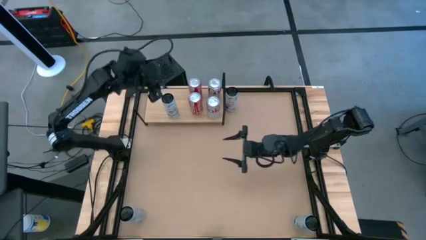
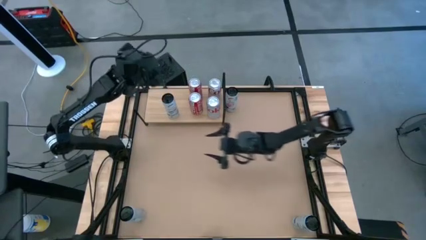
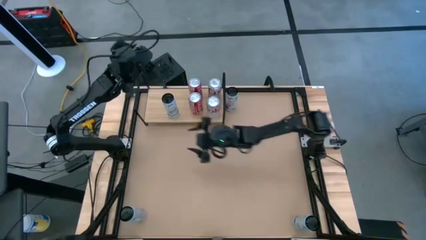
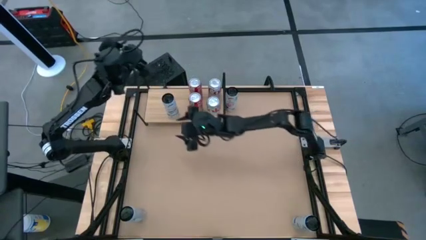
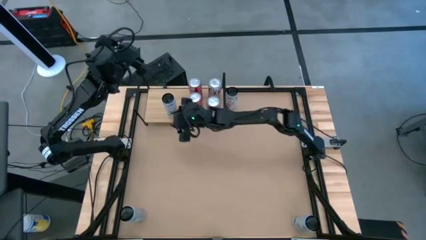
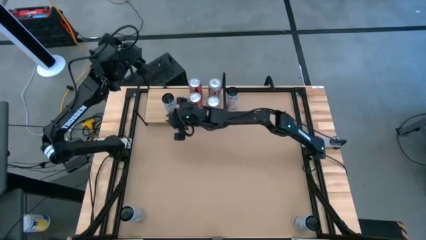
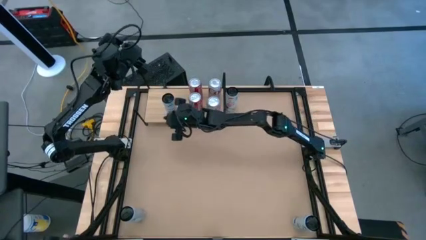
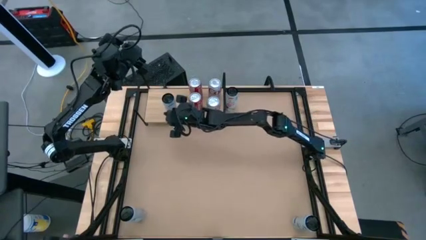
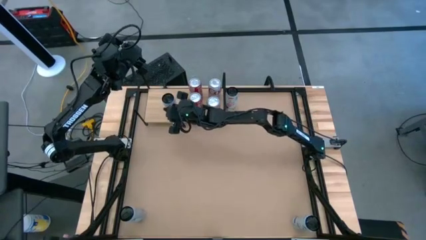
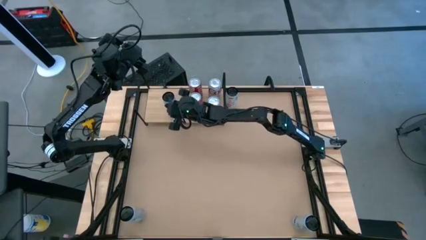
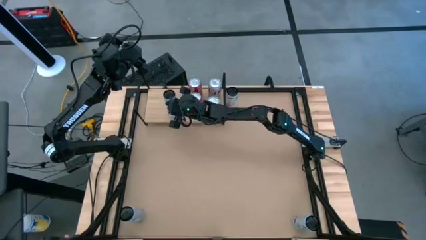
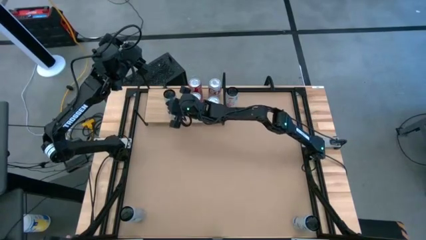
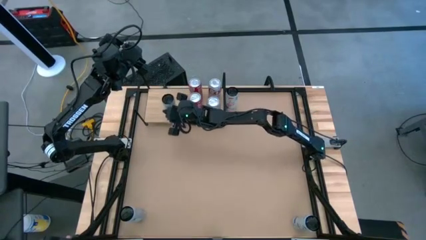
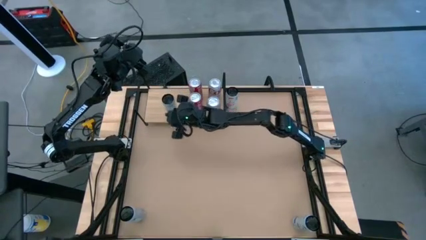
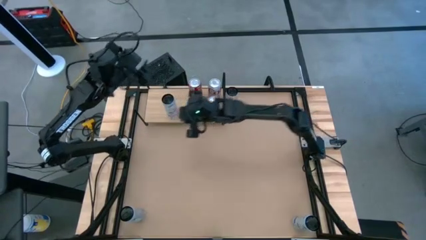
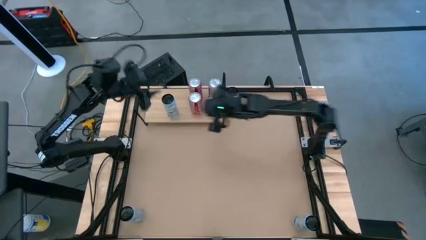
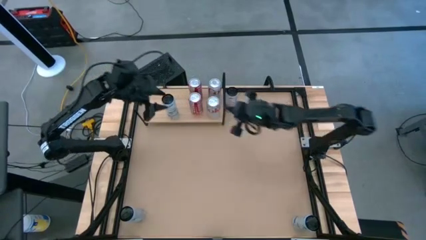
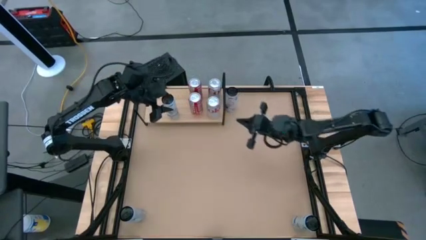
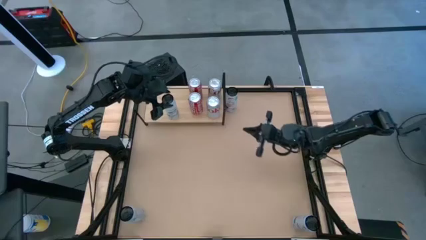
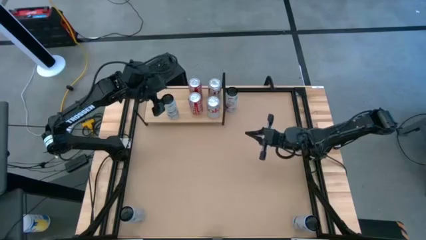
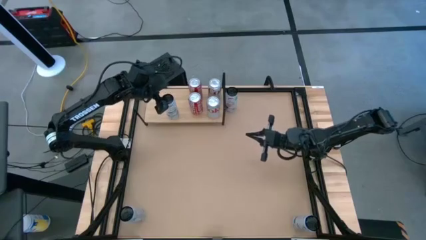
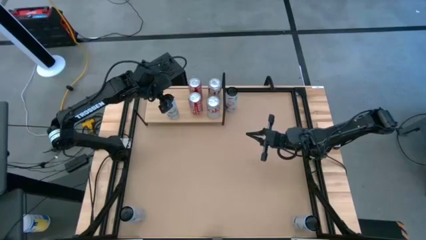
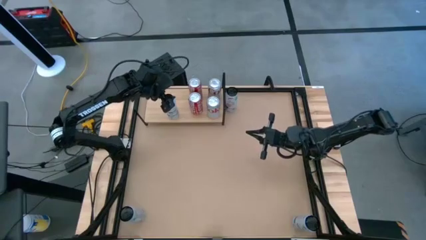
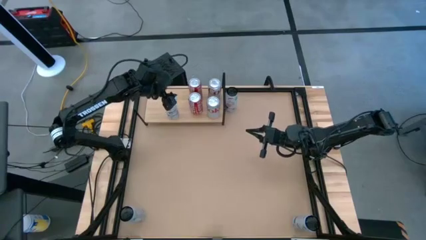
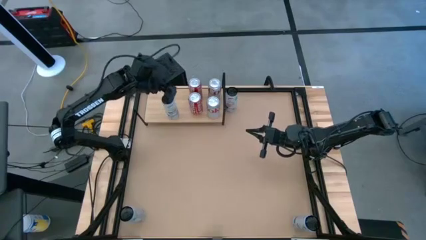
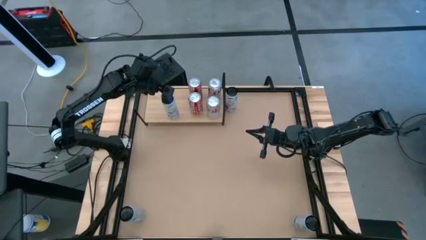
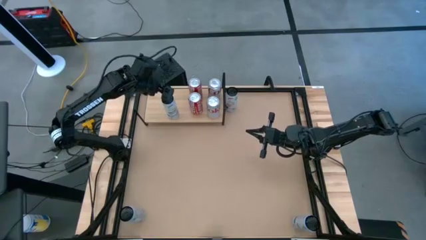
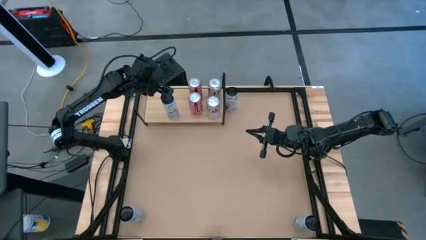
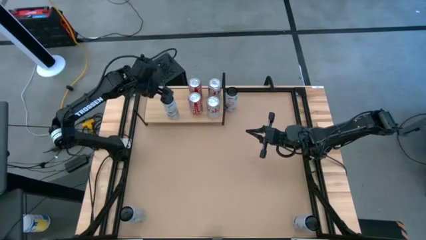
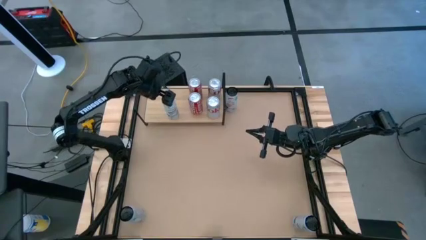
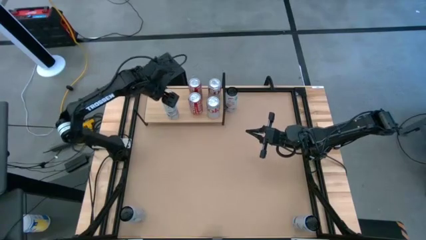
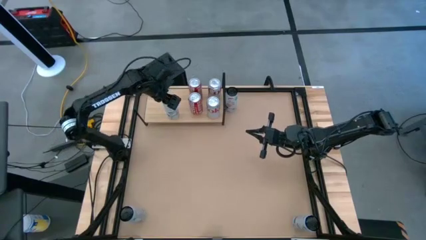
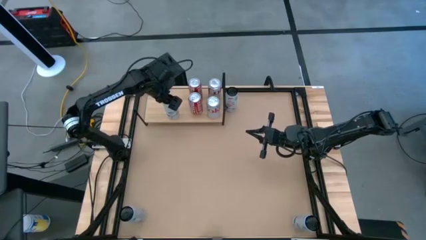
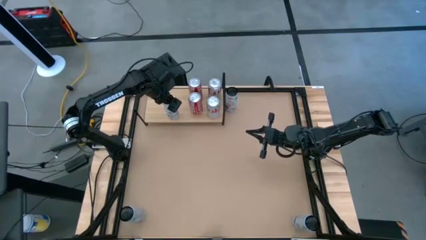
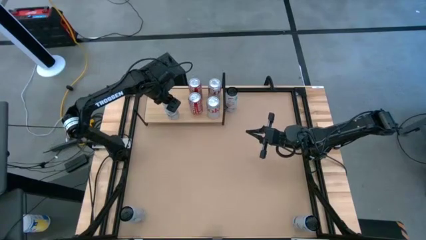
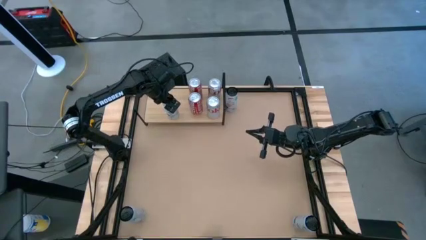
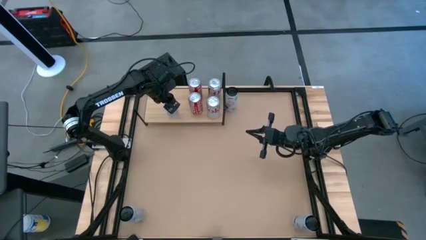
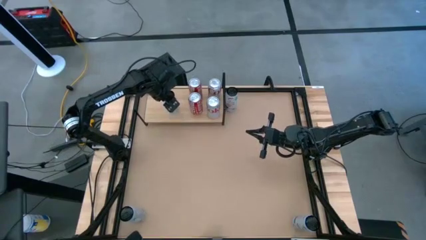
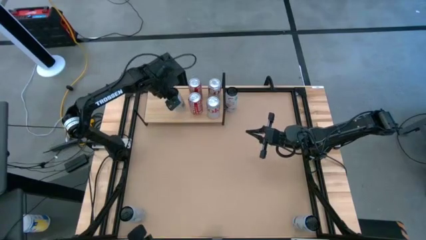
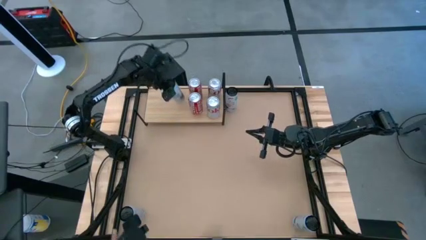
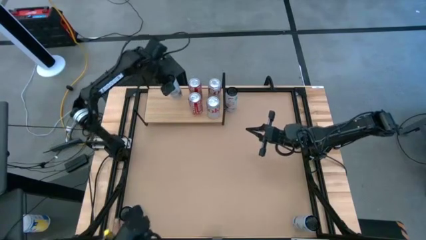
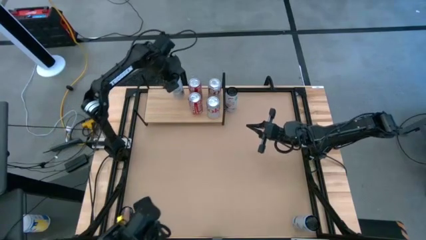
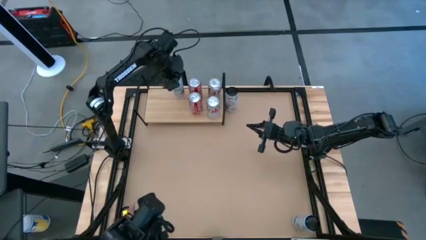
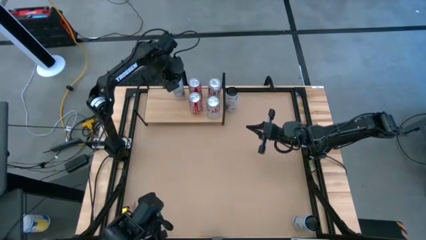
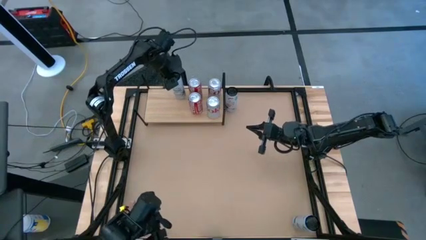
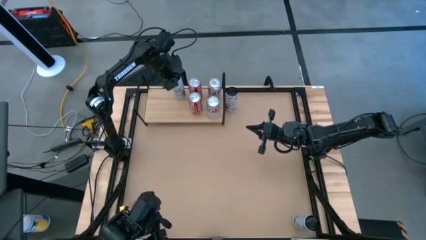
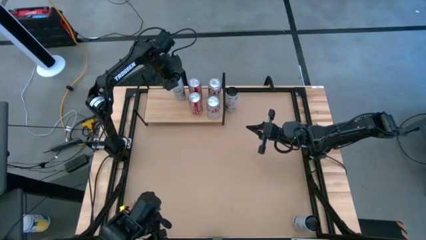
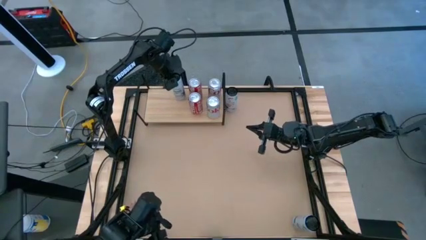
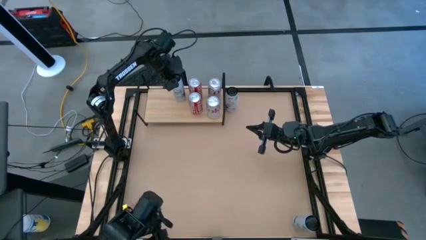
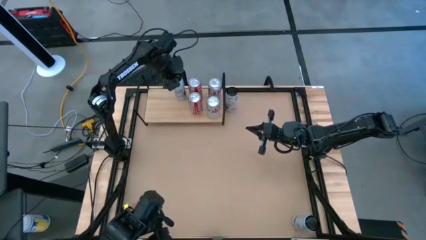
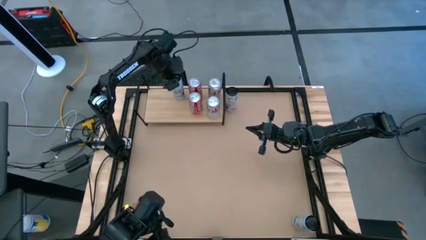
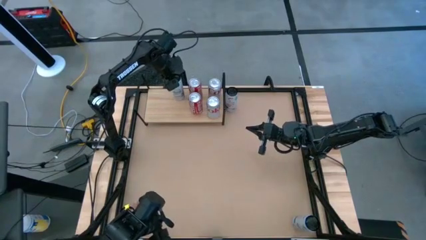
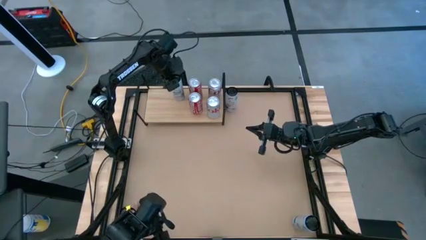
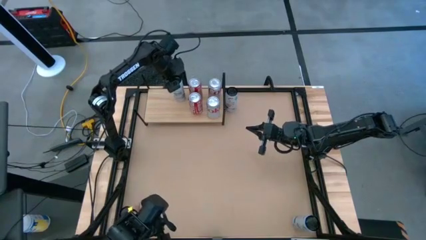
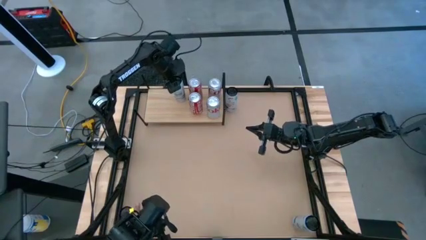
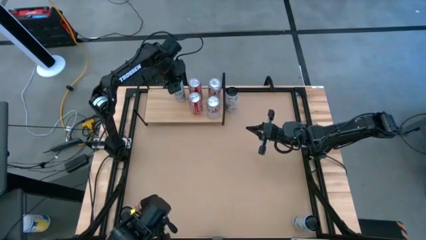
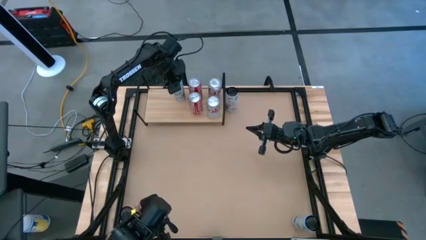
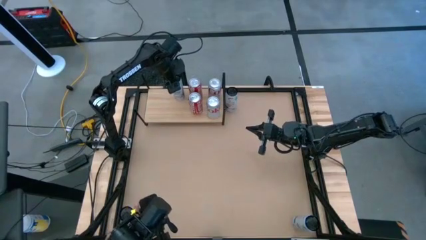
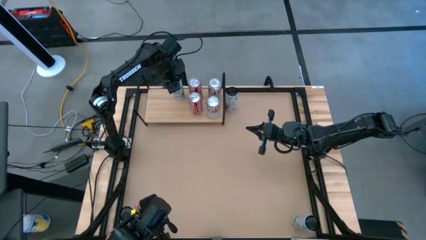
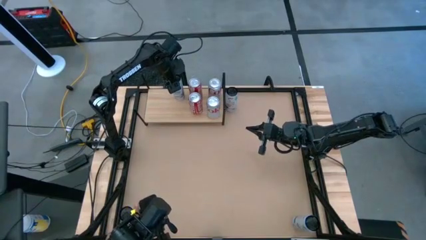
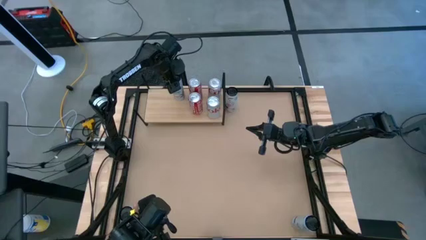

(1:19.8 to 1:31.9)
Task: Place canned beverage on shelf
Put the left white and blue soda can on the shelf

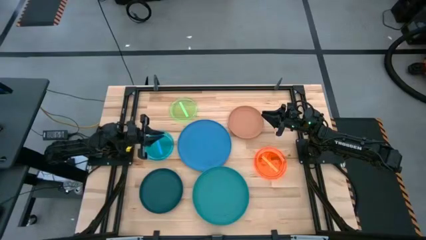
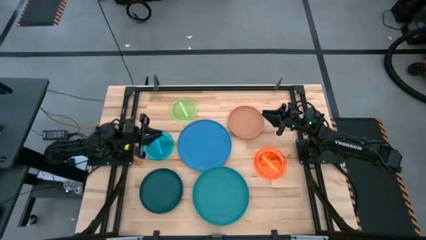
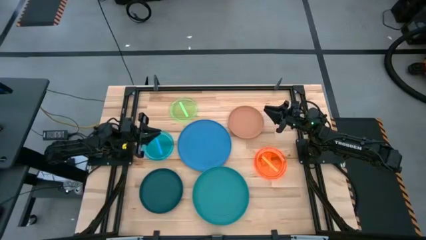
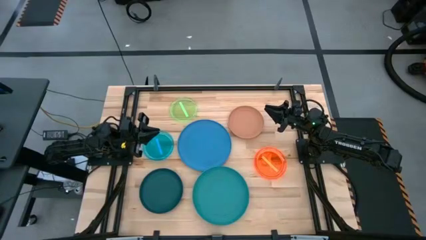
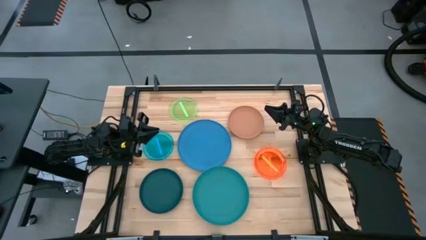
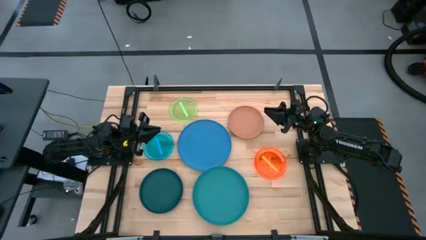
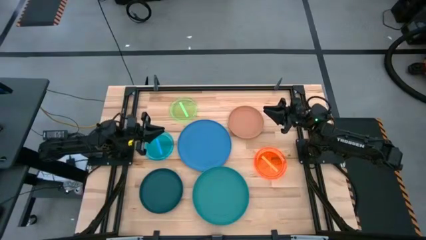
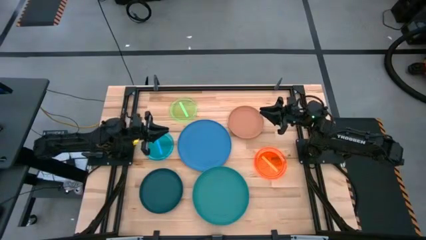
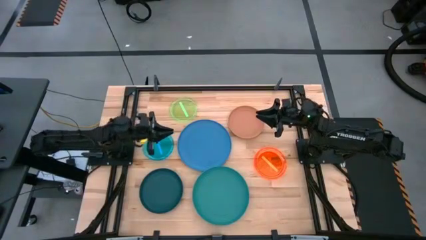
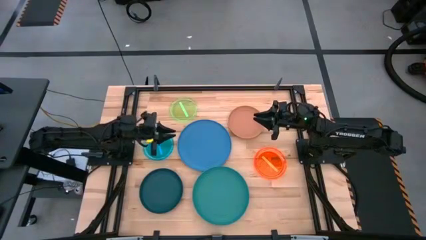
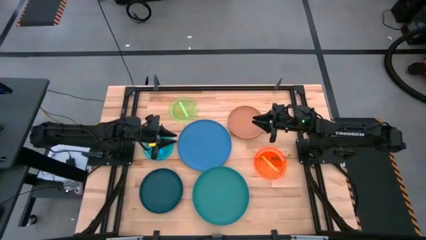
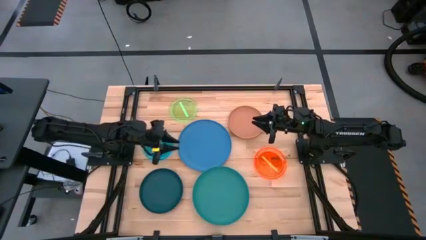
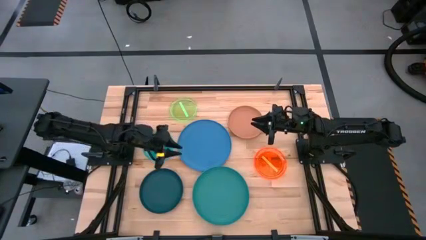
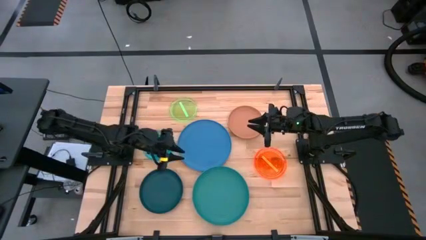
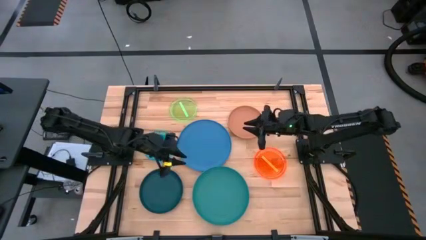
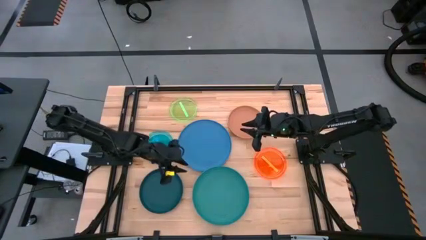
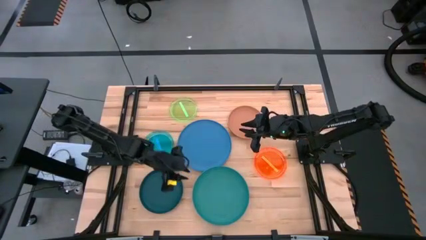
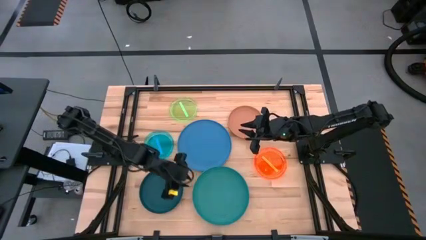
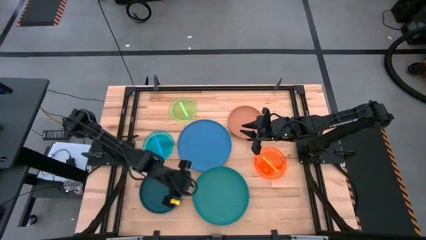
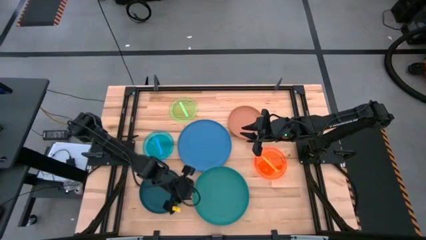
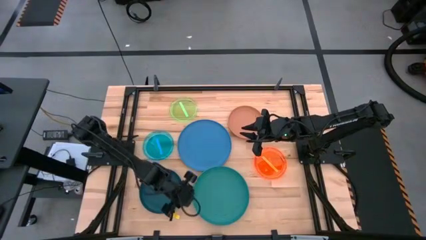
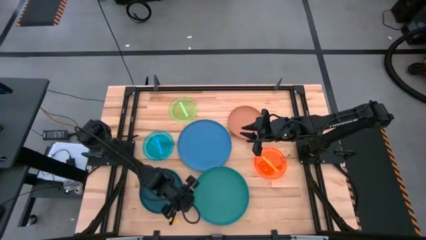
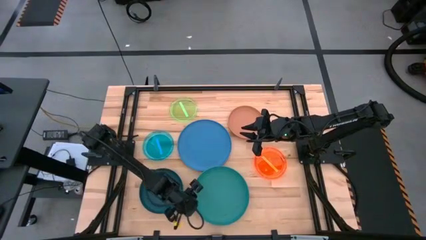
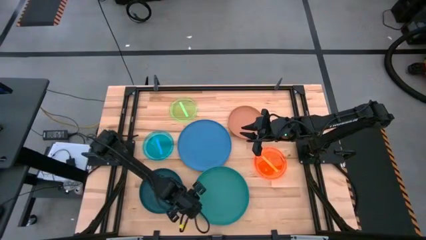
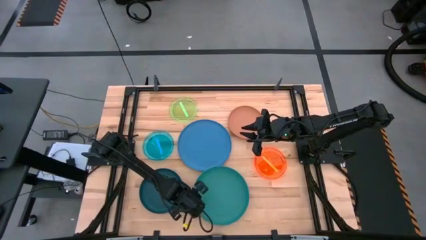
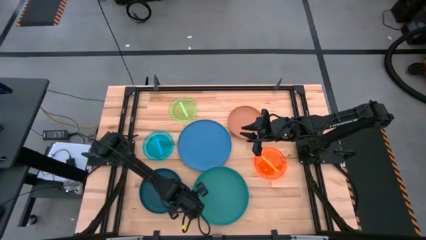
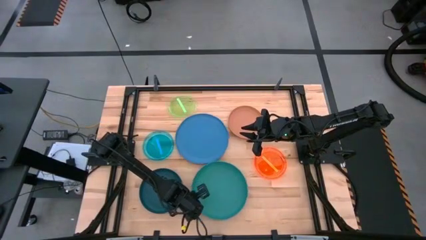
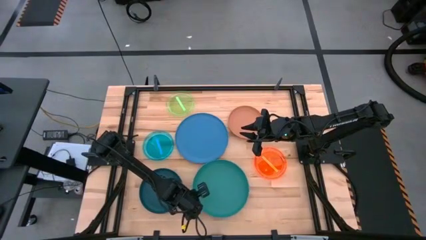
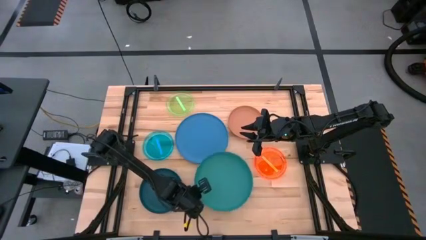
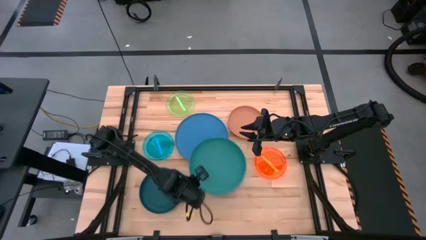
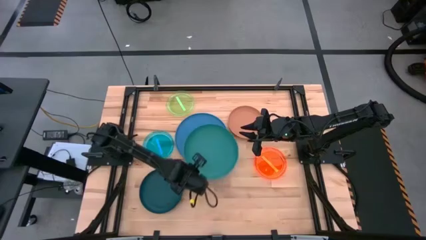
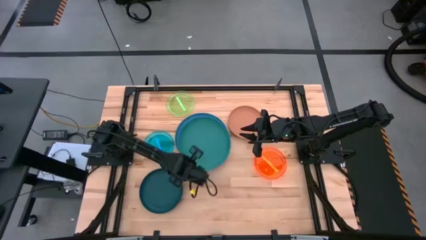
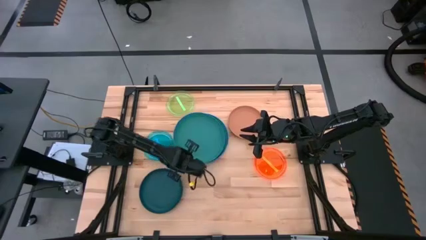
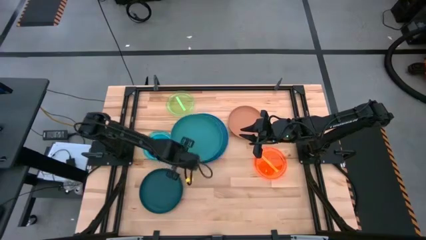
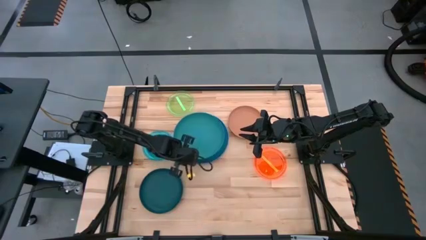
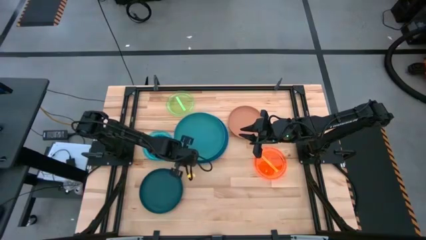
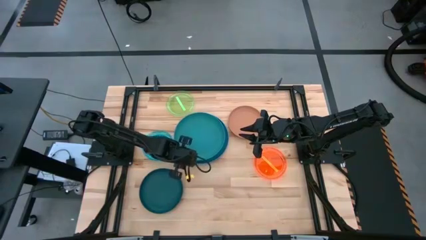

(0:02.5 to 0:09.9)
Task: Stack plastic plates
Stack the green plate on top of the blue plate
